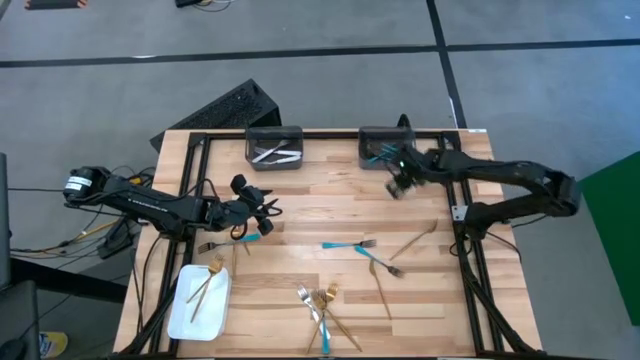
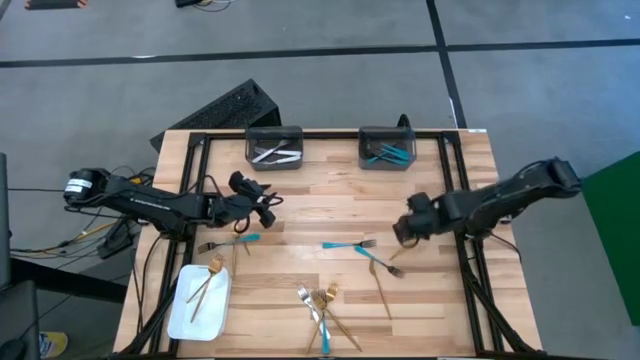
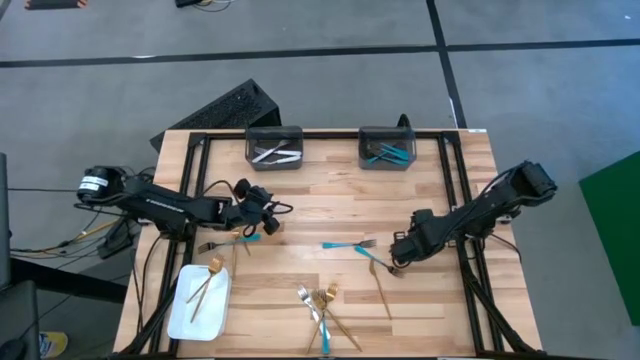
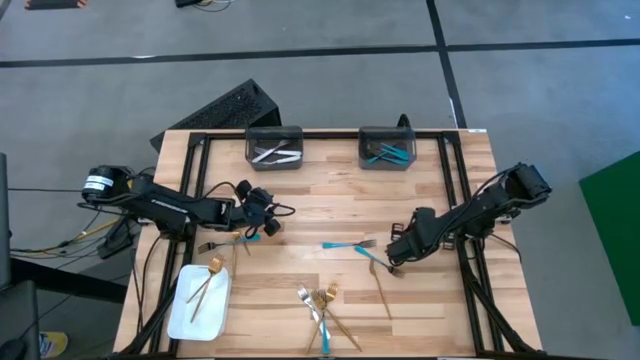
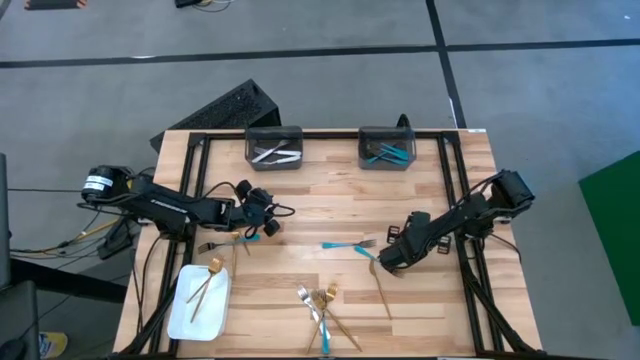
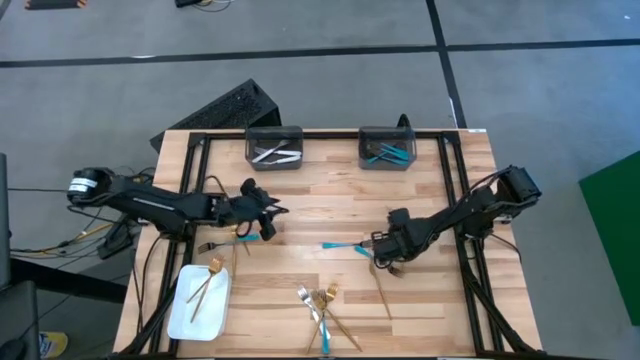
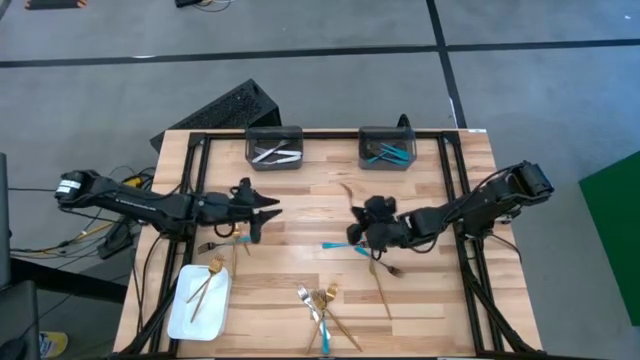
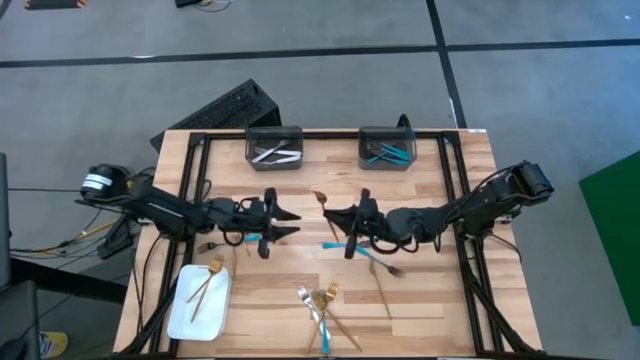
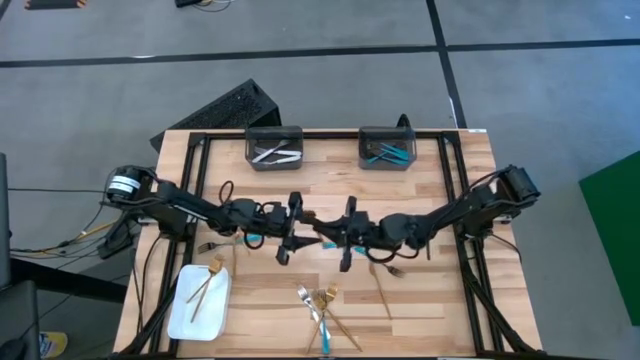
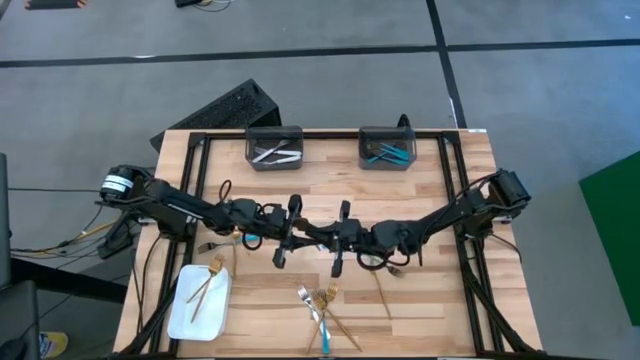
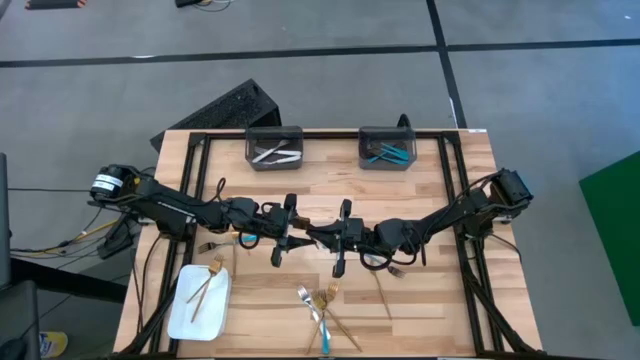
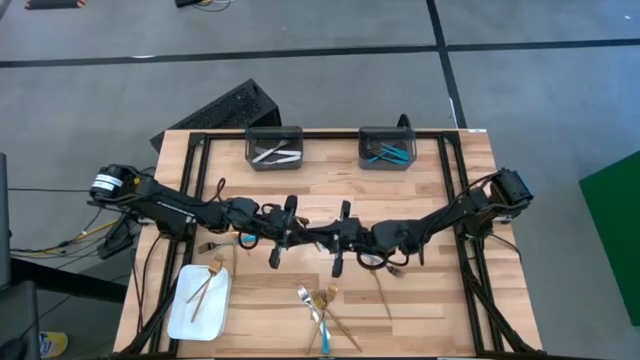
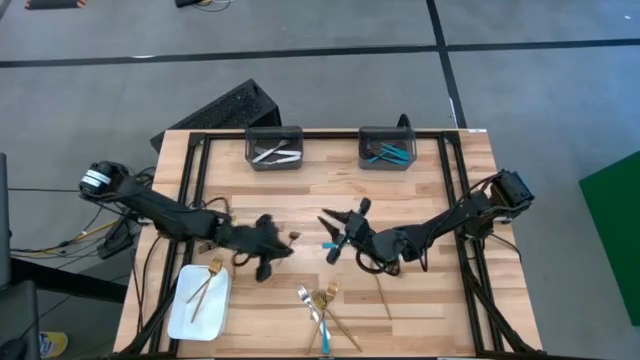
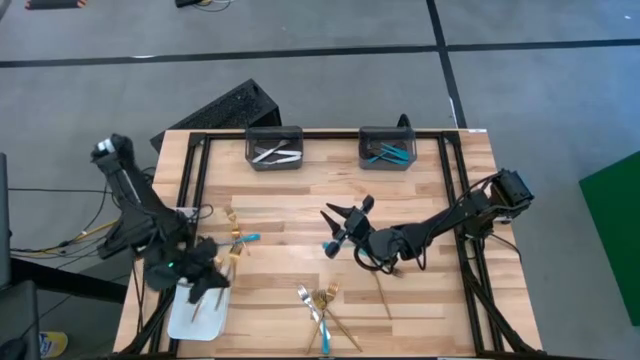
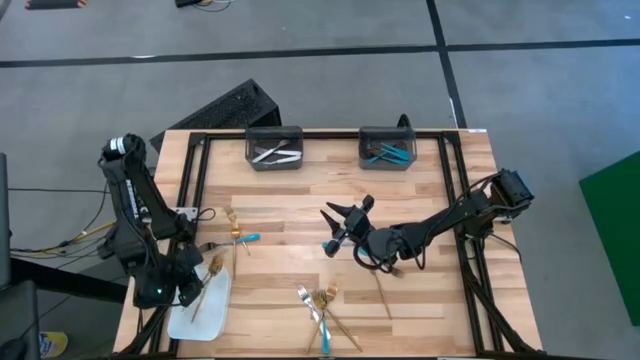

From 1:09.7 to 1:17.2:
Task: Sort silverware by color (type)
Put the gold fork into the white bin

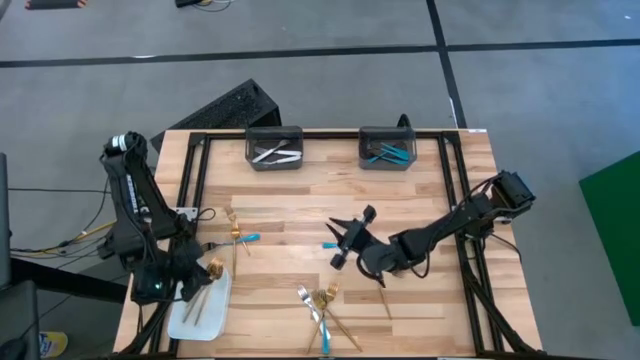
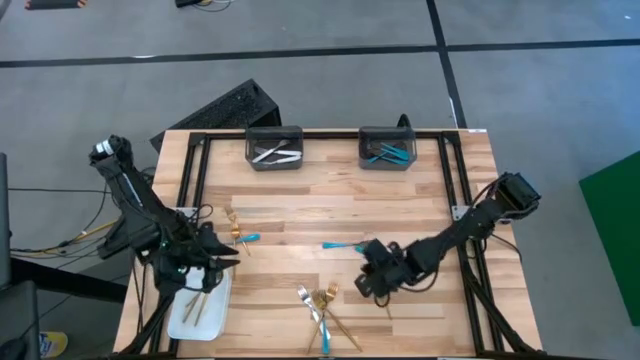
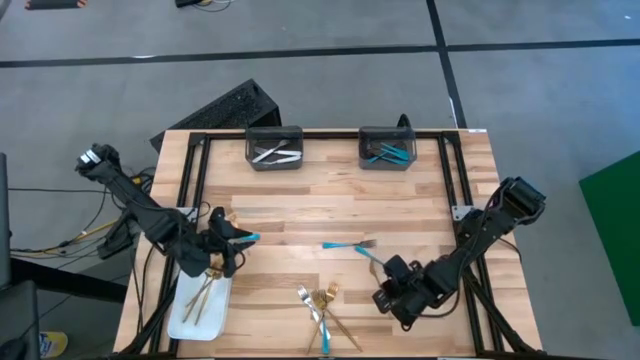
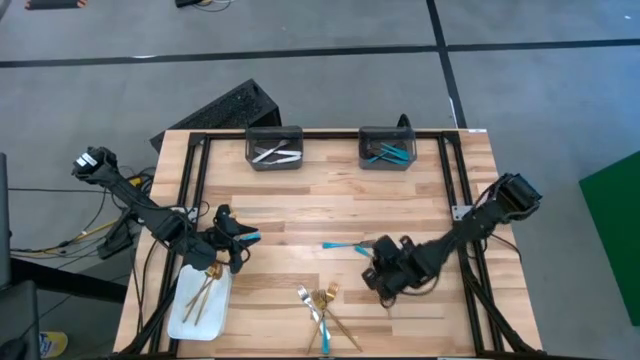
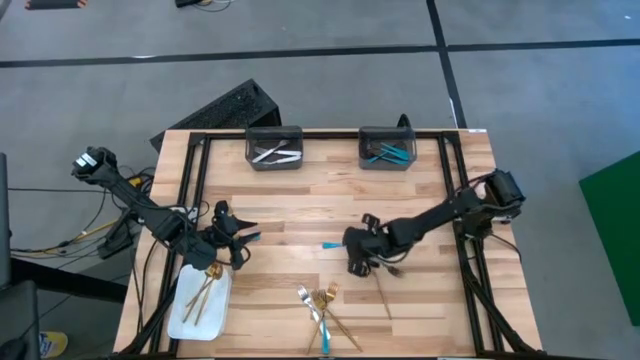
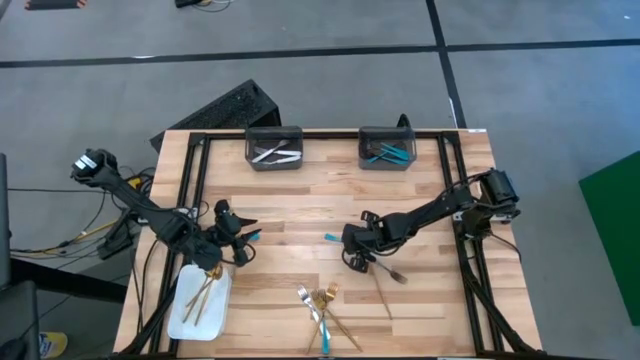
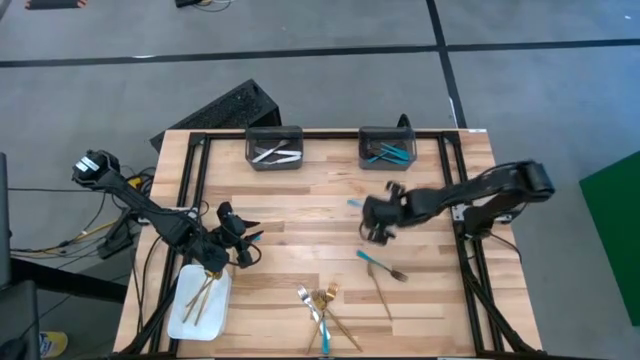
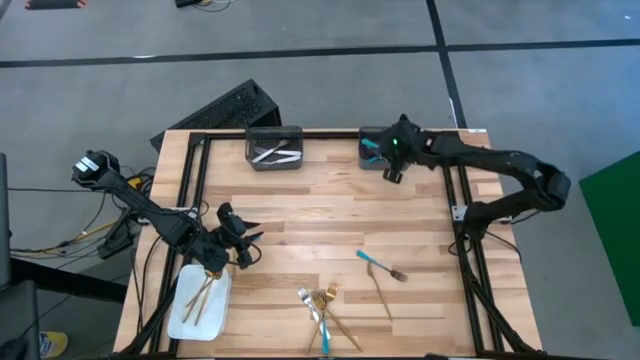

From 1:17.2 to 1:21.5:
Put the blue fork into the right black bin

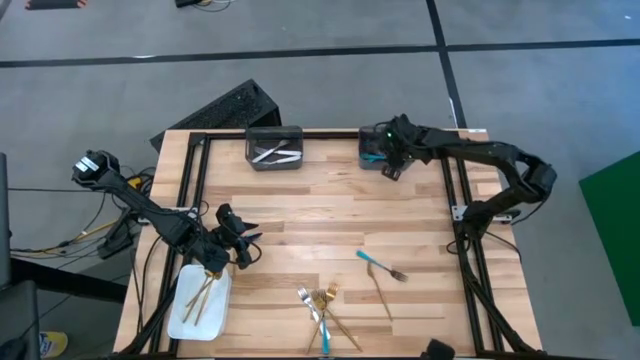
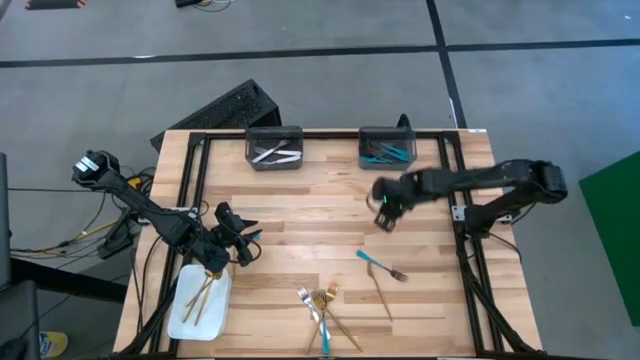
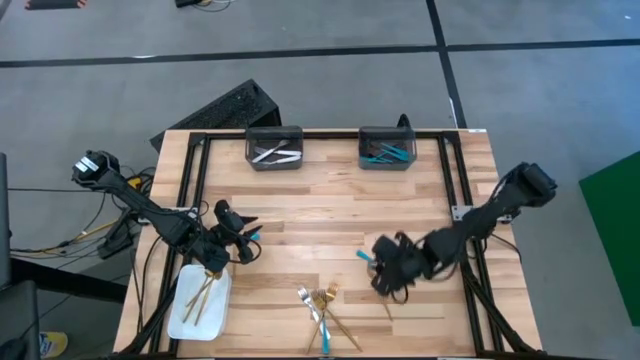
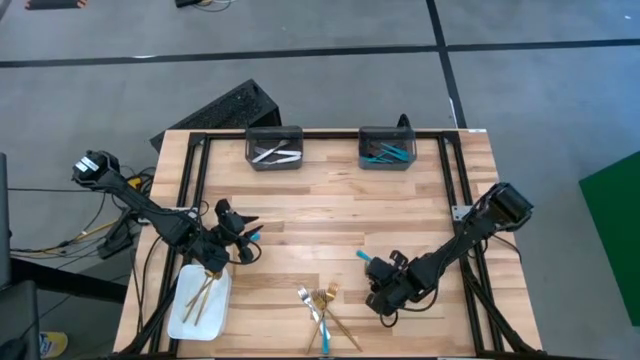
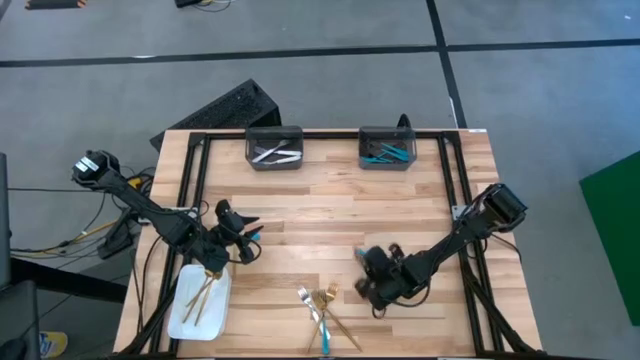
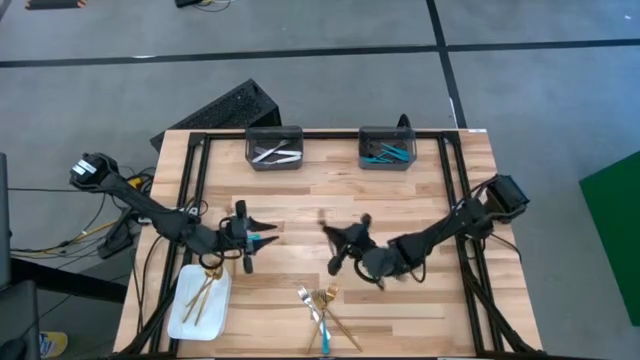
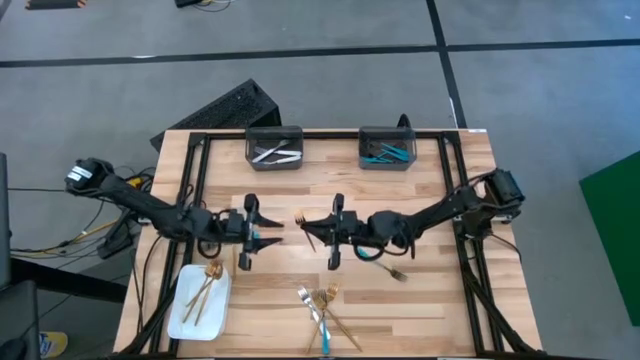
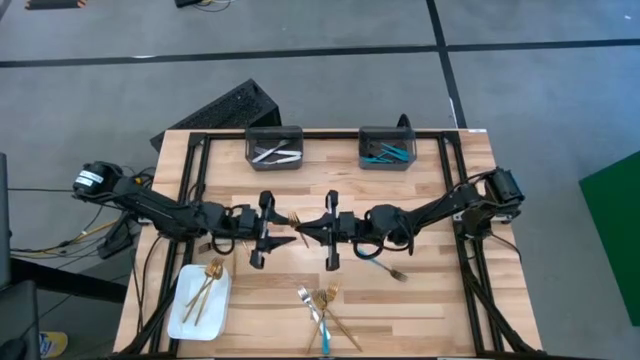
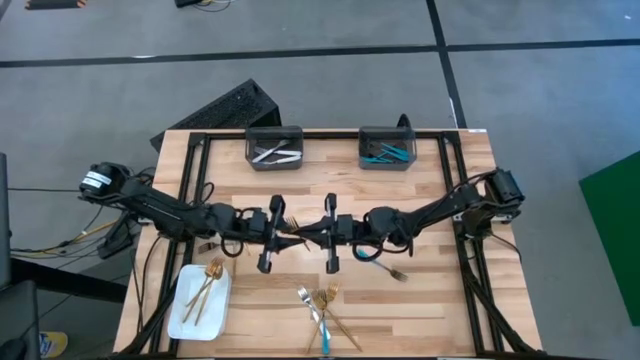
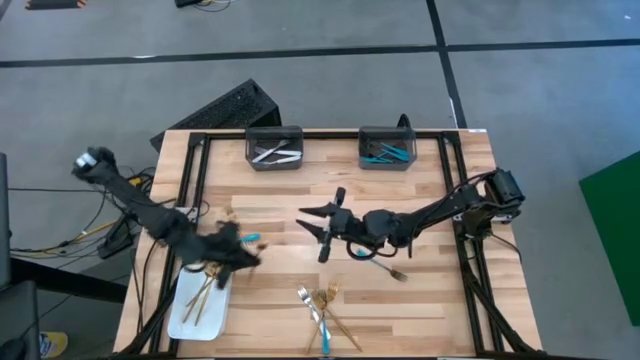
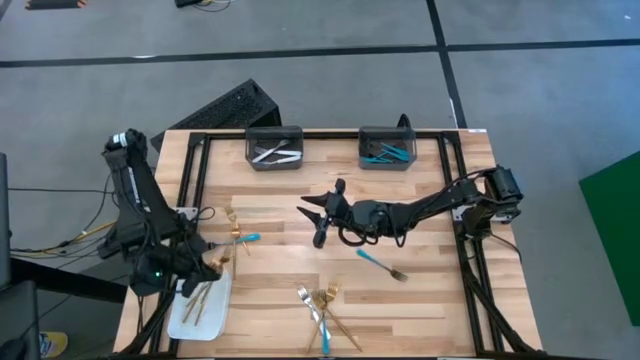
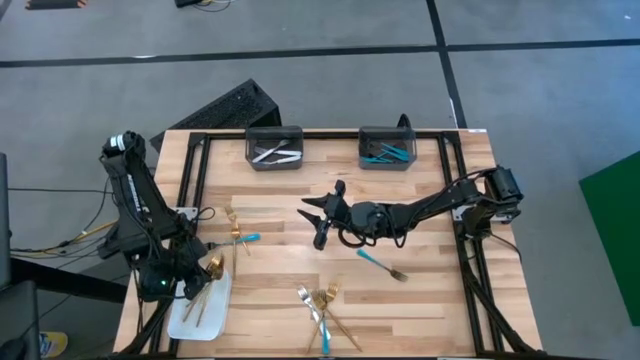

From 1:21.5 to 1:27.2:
Put the gold fork into the white bin

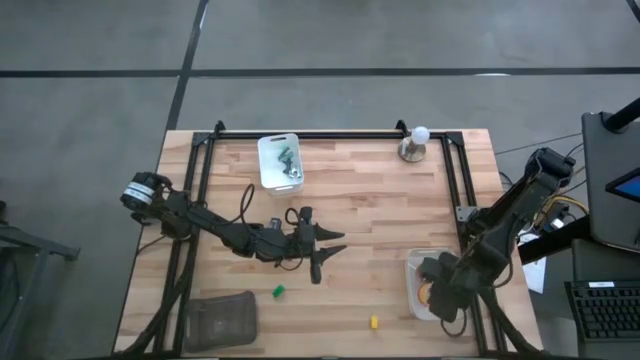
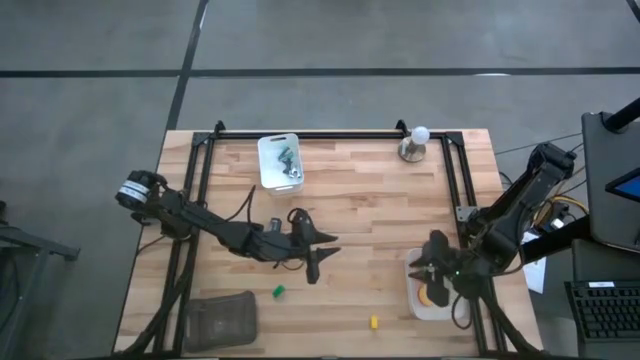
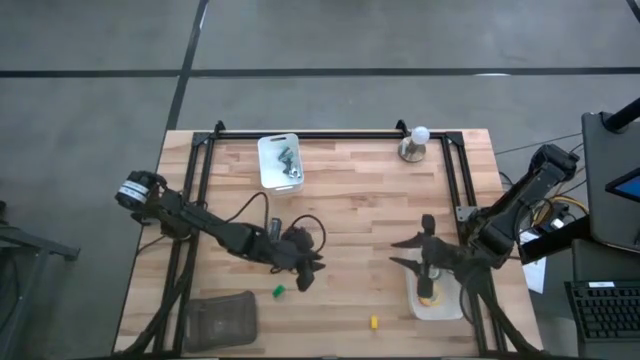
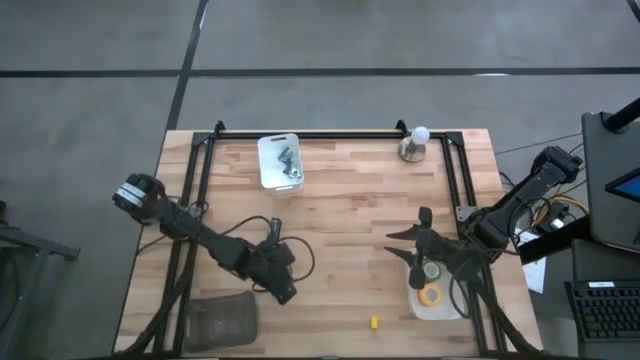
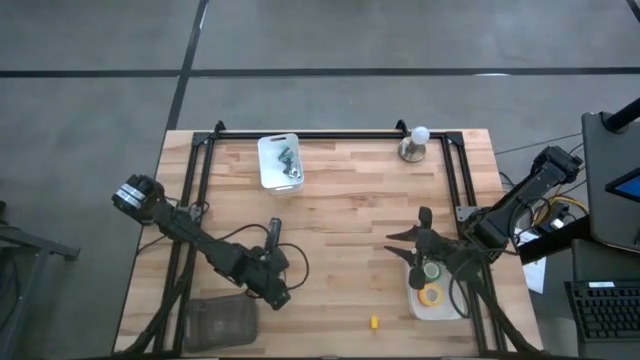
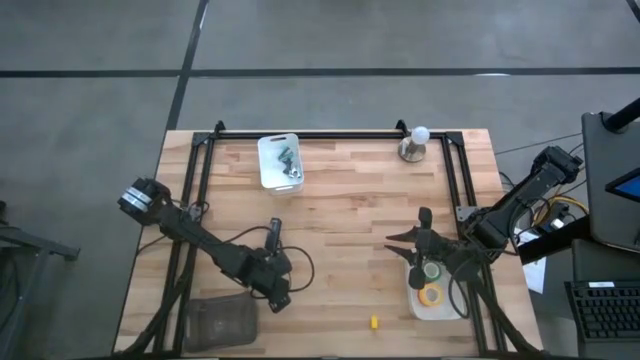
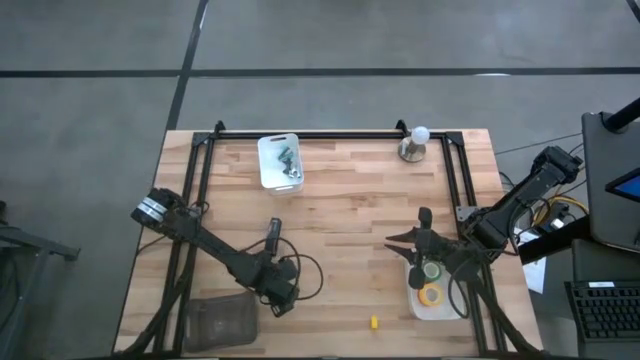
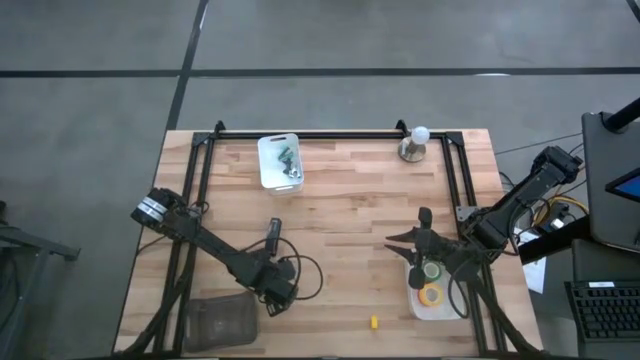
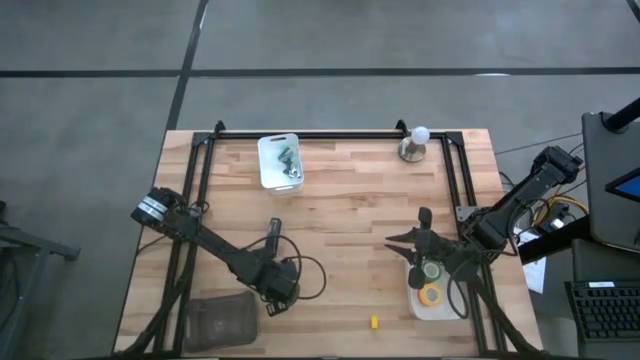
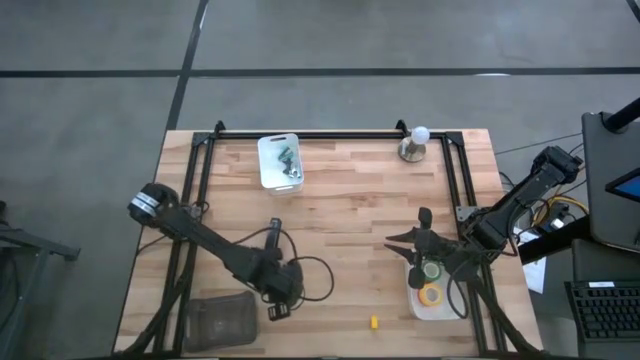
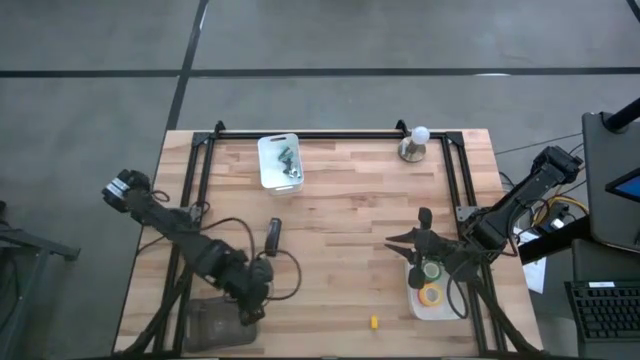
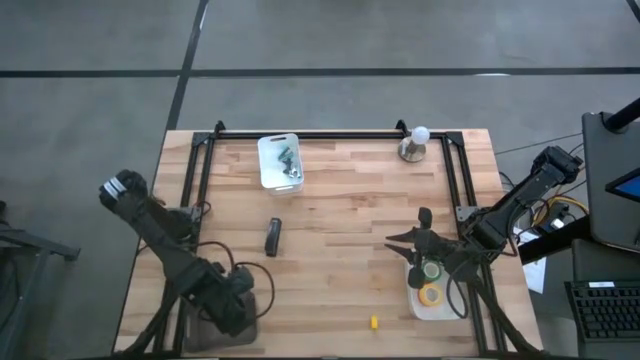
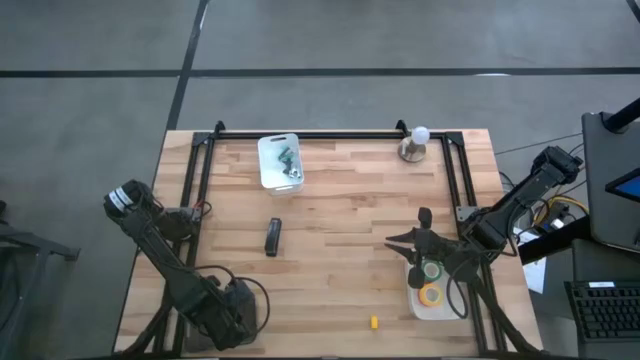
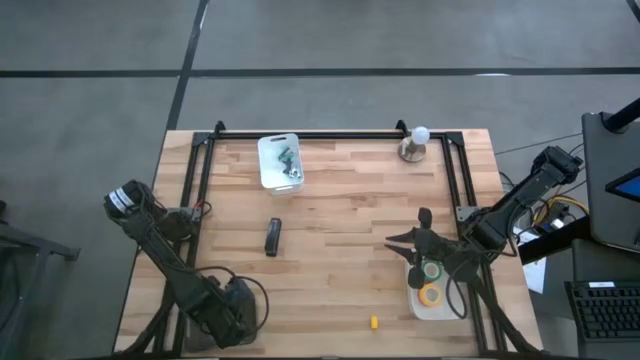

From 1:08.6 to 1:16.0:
Task: Pick and place Stapler, Stapler remover, tape
Put the green stapler into the black bin
